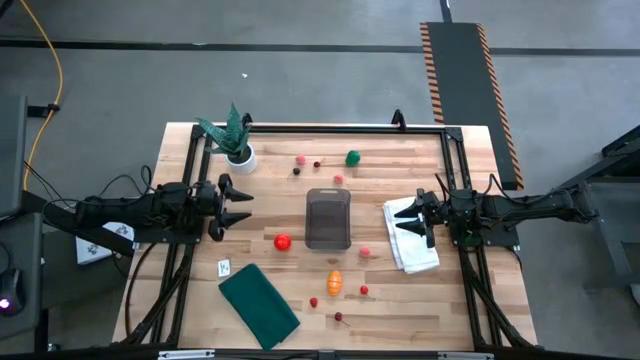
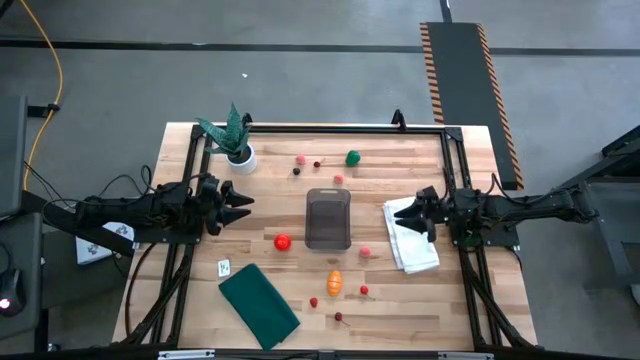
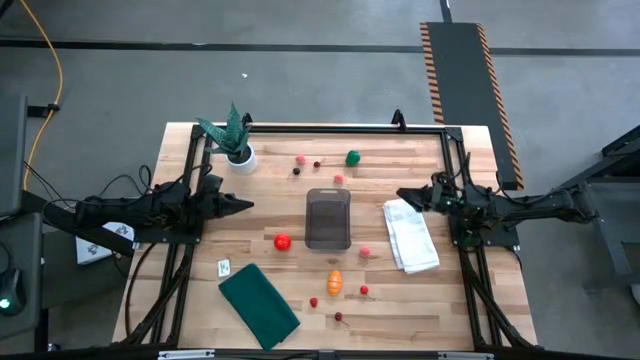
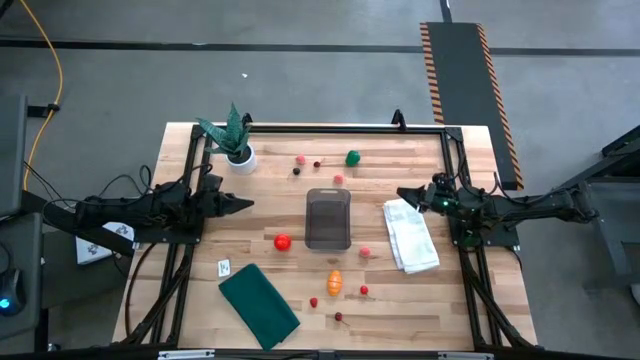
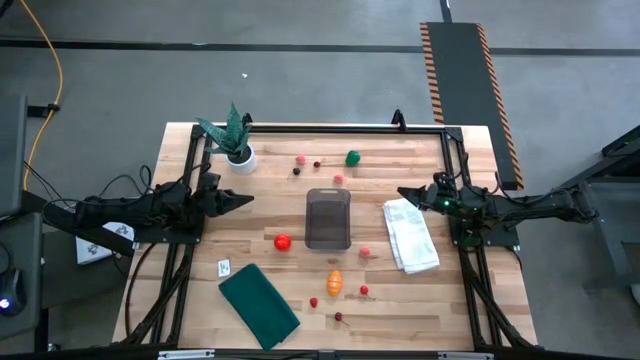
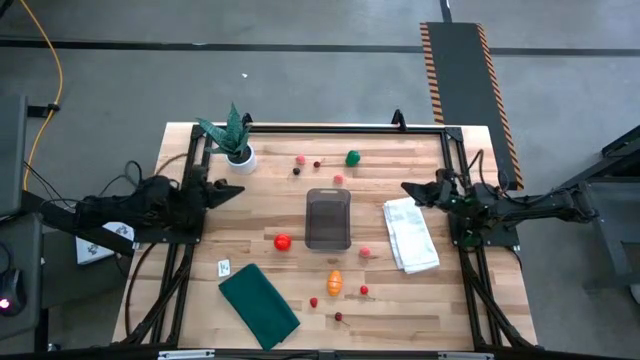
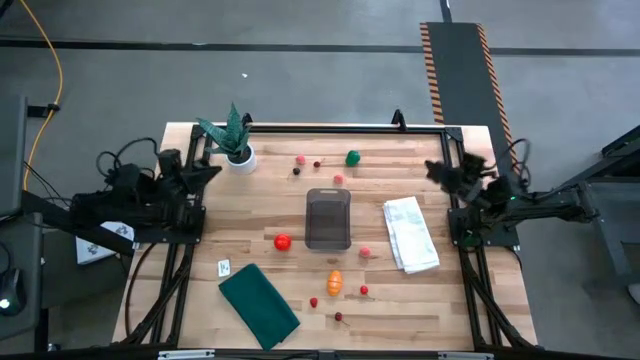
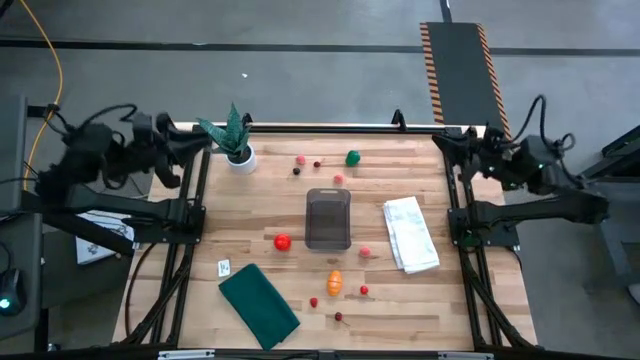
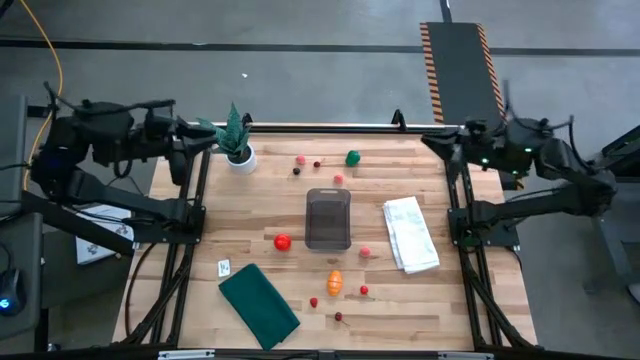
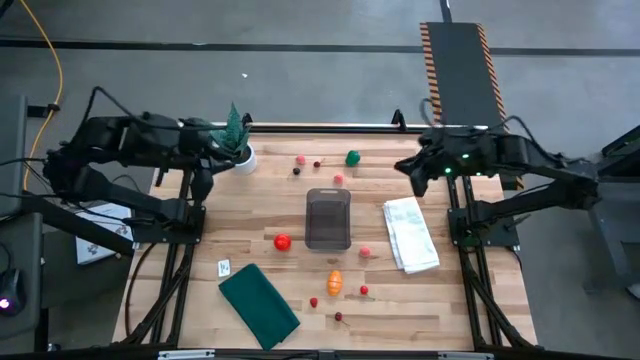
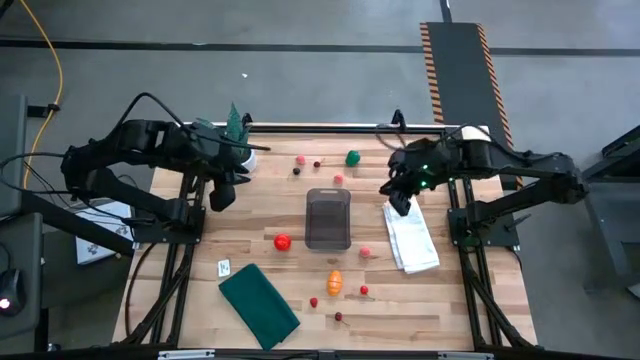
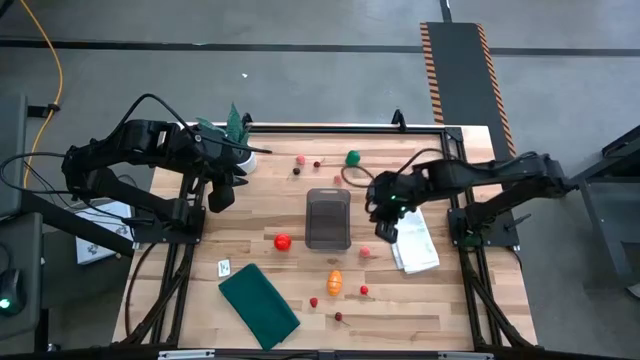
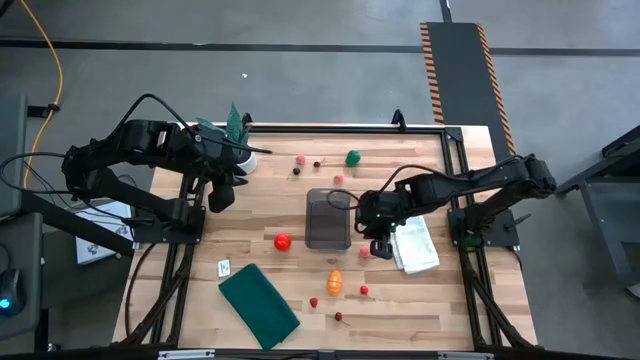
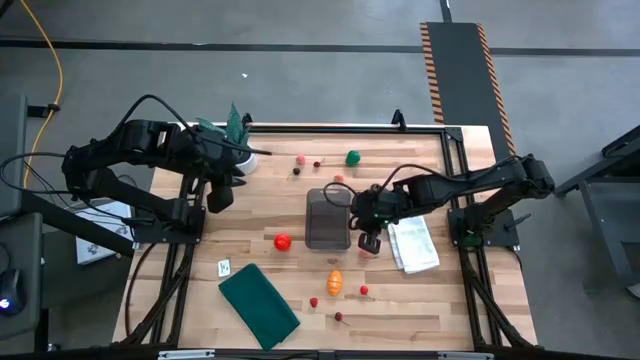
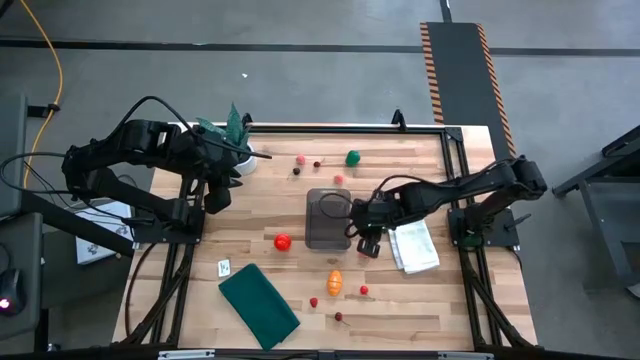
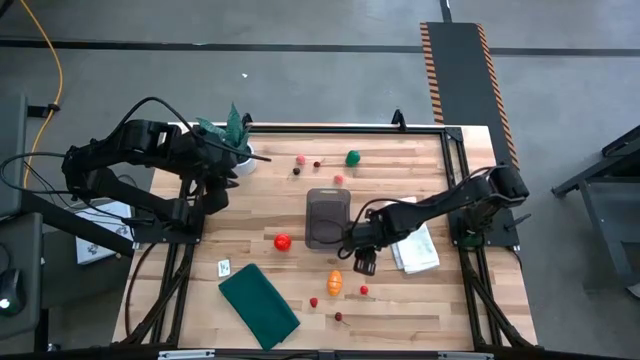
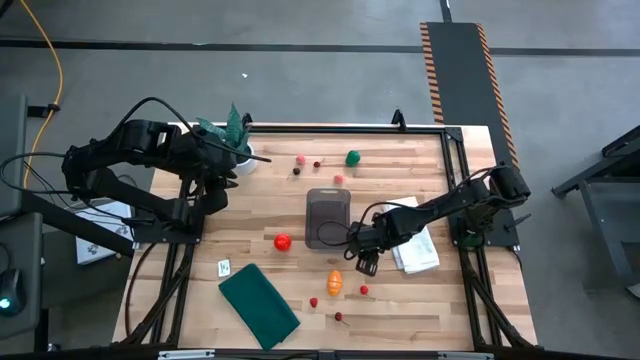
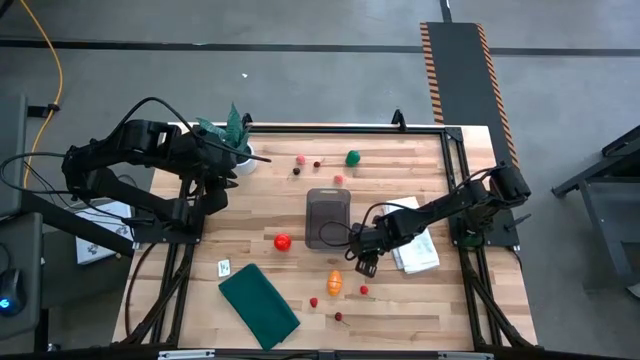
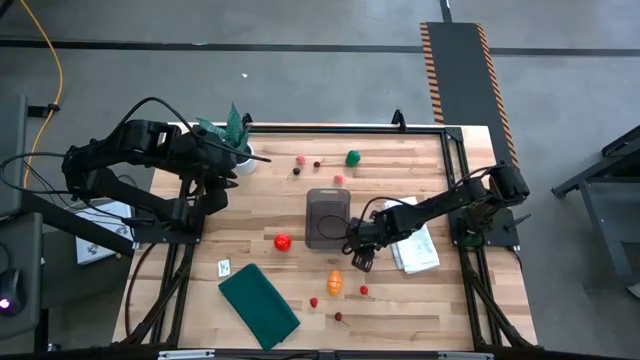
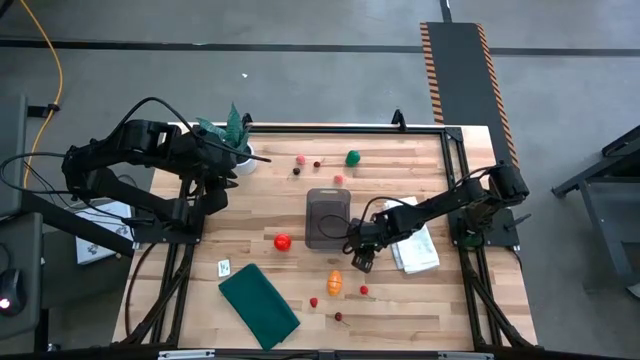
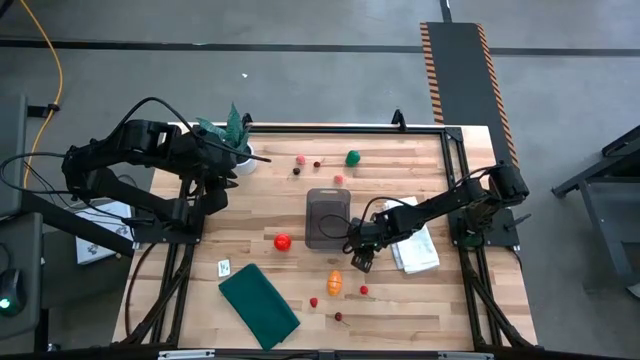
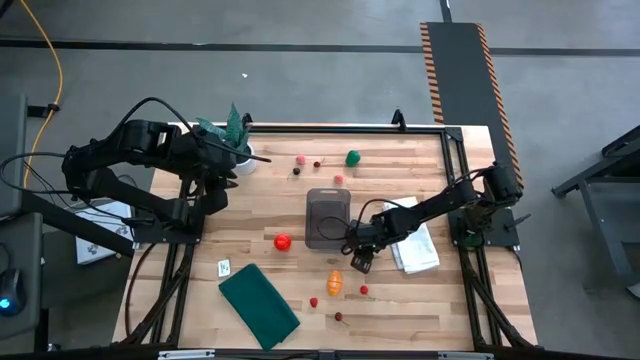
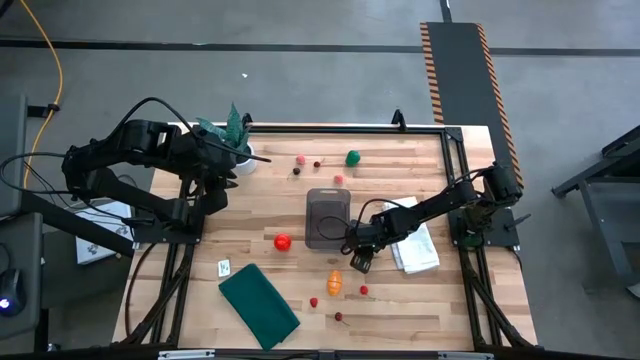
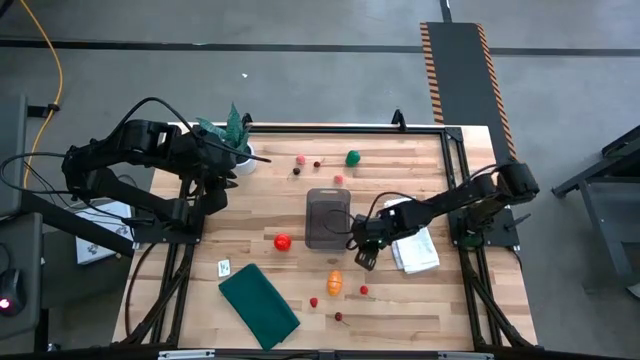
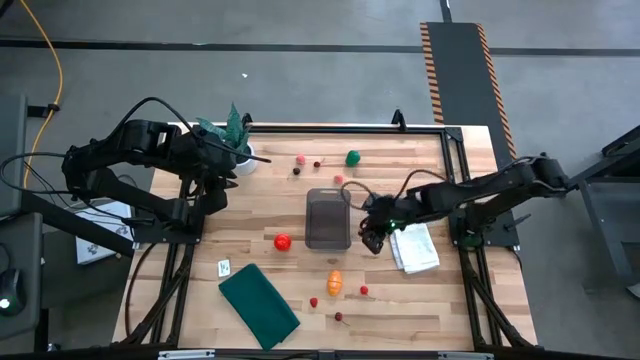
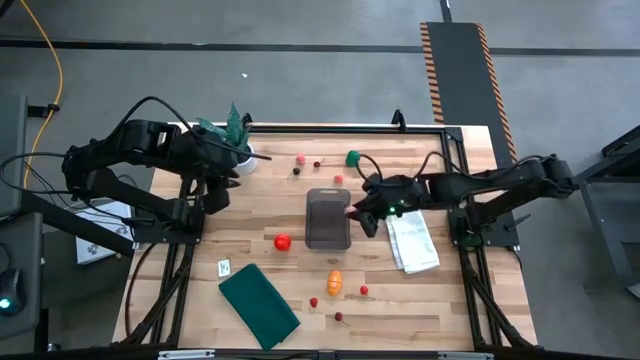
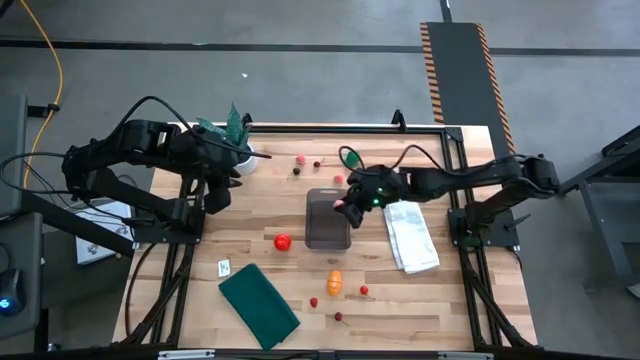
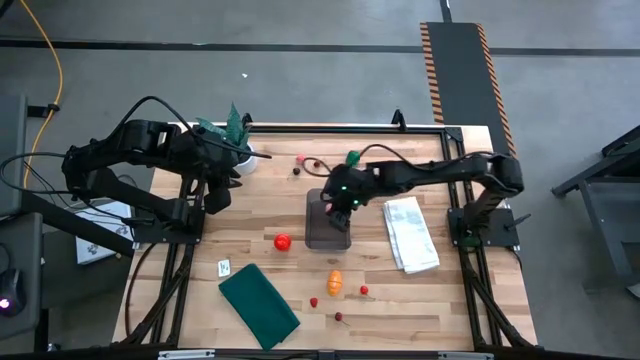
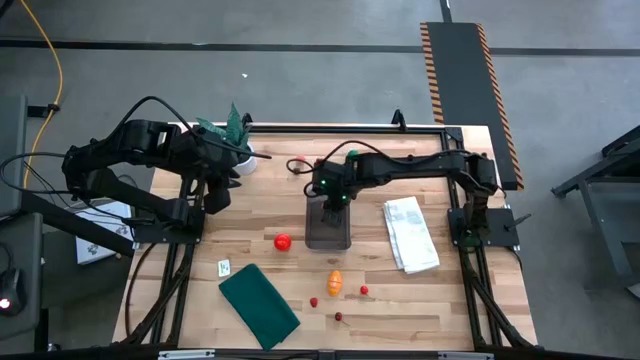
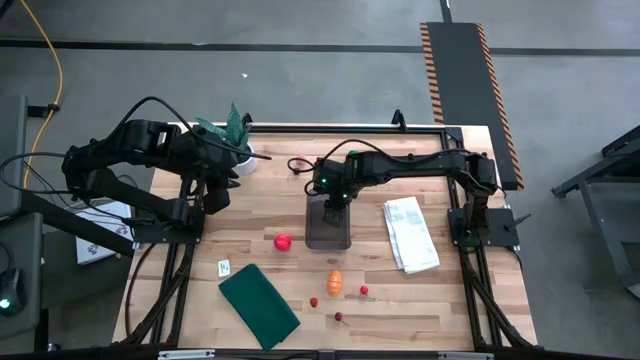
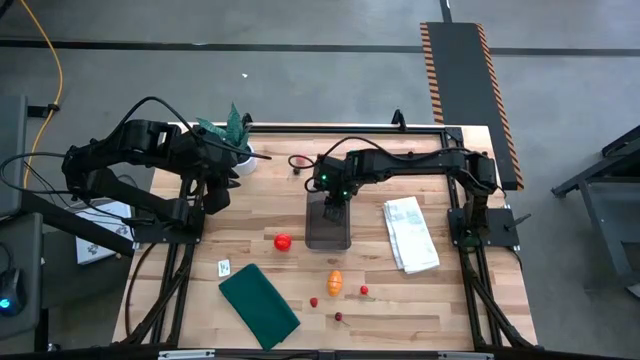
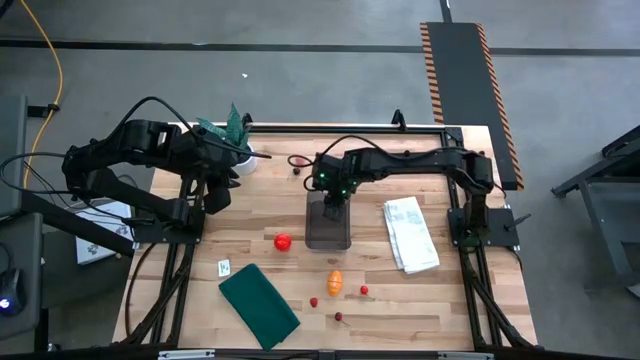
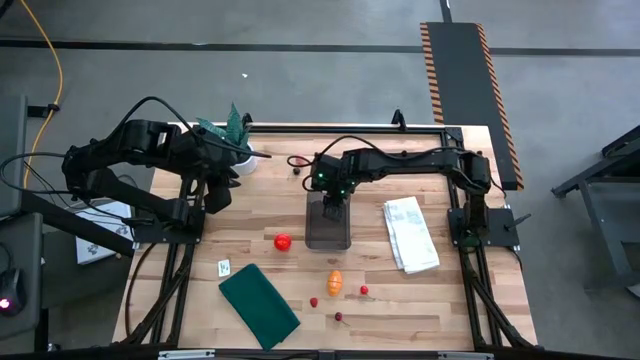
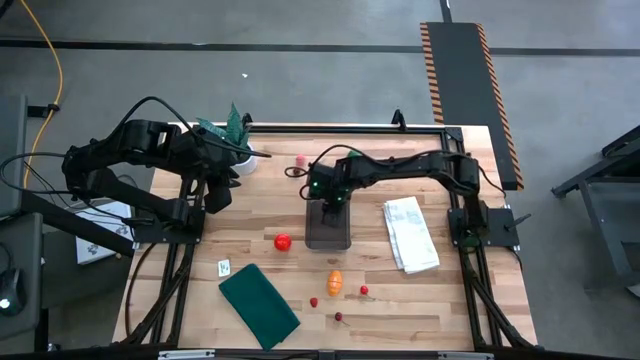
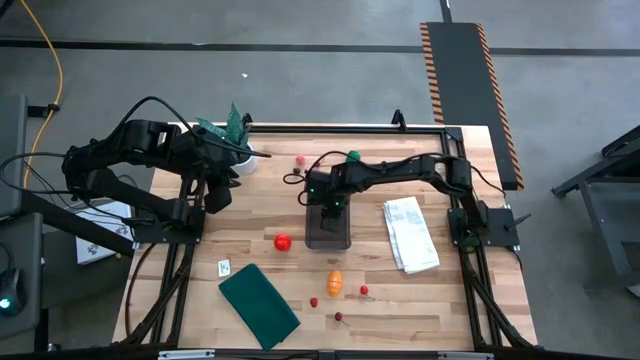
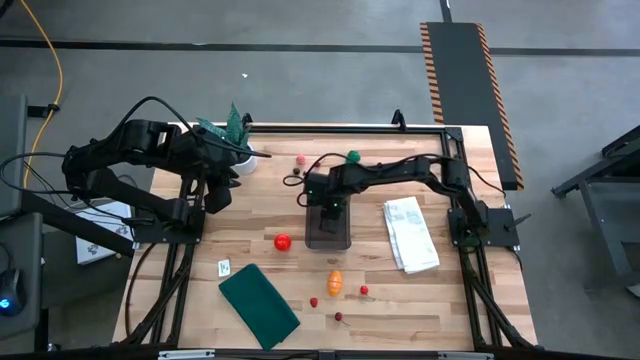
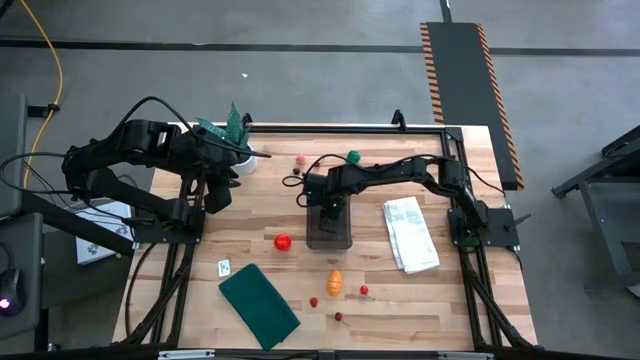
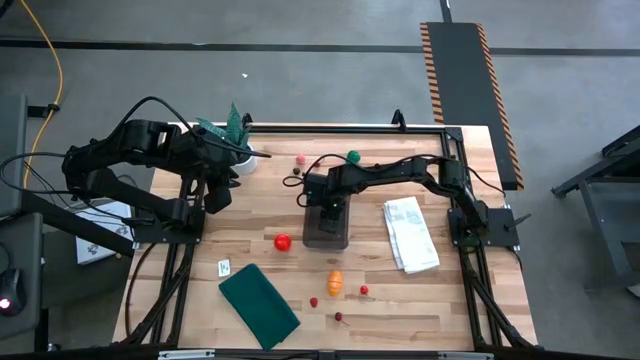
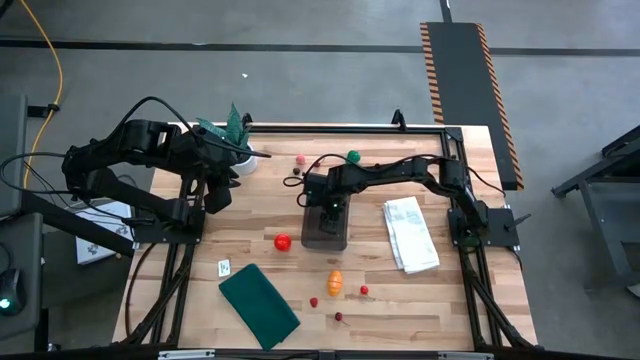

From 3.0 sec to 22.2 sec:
Task: Pick and placing Produce into tupperware
Put the pink peach into the transparent black bin
